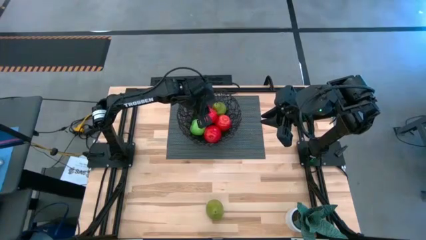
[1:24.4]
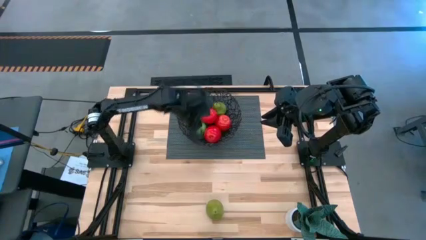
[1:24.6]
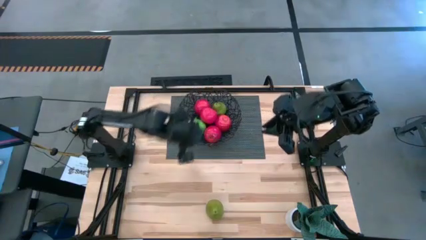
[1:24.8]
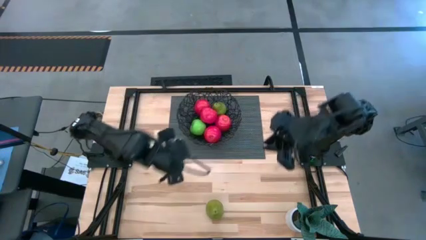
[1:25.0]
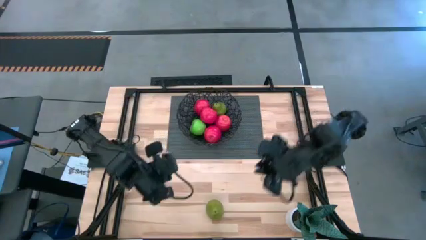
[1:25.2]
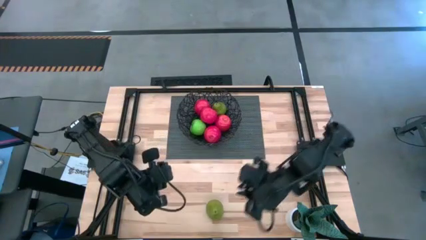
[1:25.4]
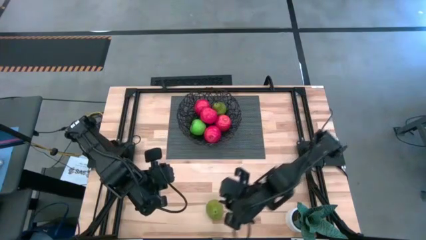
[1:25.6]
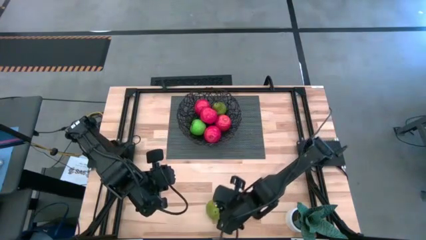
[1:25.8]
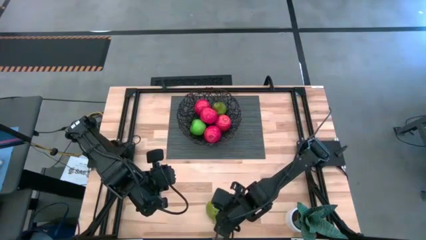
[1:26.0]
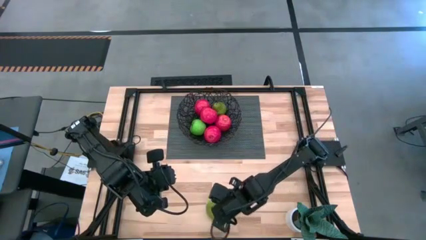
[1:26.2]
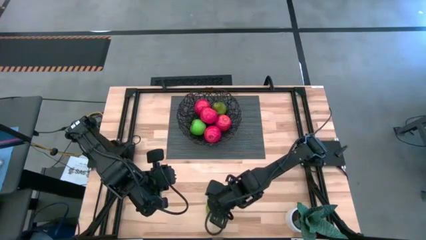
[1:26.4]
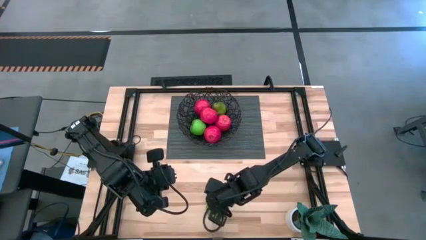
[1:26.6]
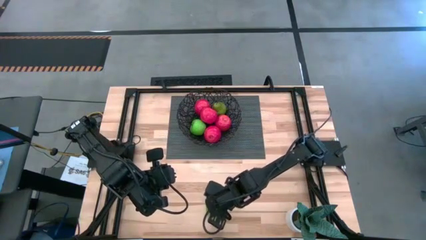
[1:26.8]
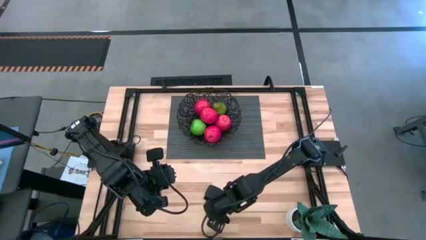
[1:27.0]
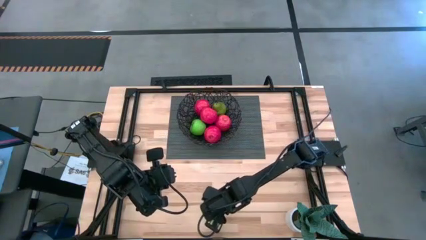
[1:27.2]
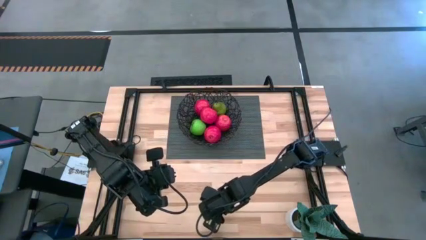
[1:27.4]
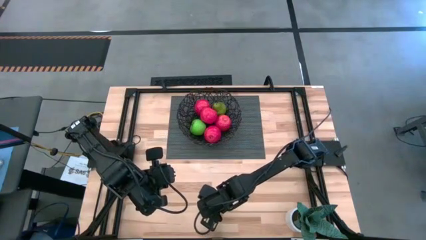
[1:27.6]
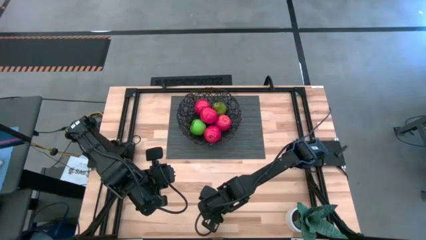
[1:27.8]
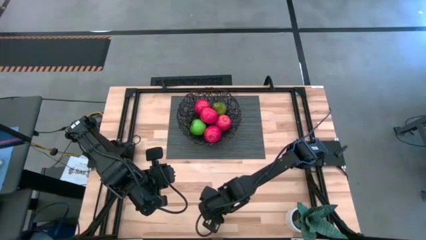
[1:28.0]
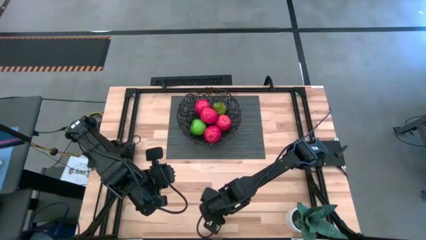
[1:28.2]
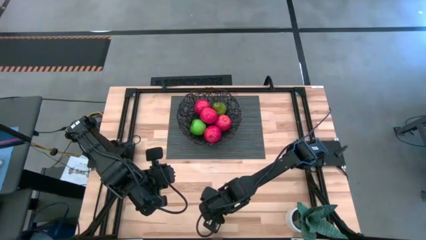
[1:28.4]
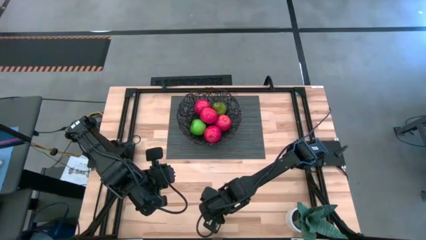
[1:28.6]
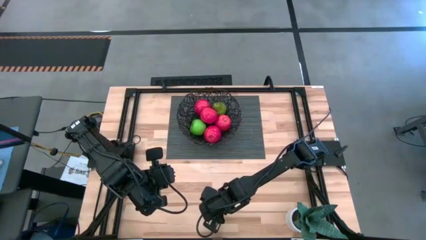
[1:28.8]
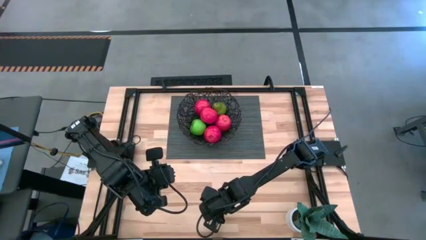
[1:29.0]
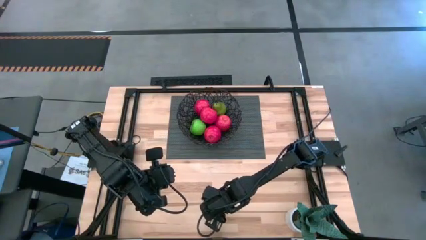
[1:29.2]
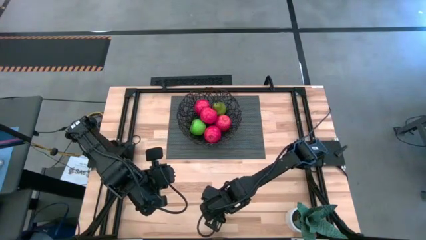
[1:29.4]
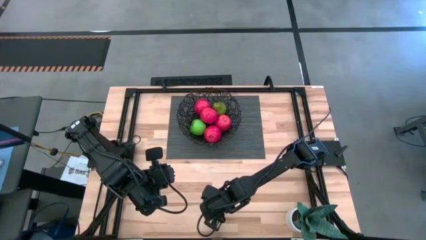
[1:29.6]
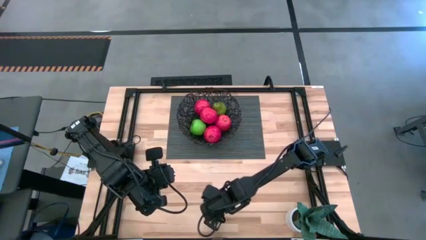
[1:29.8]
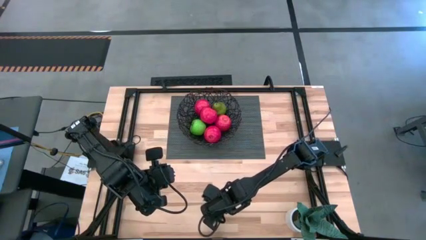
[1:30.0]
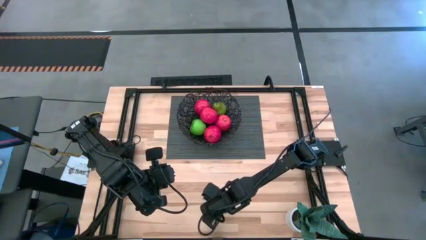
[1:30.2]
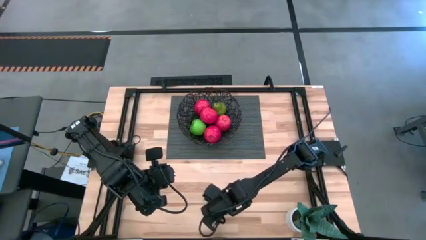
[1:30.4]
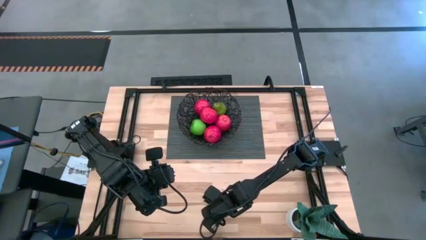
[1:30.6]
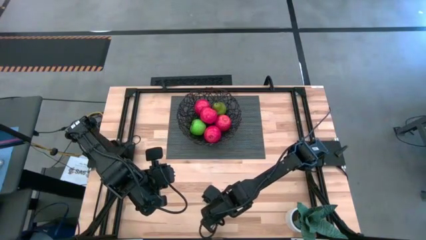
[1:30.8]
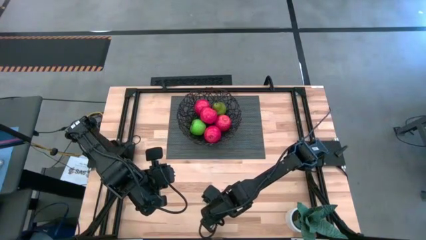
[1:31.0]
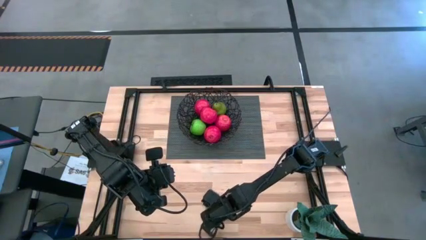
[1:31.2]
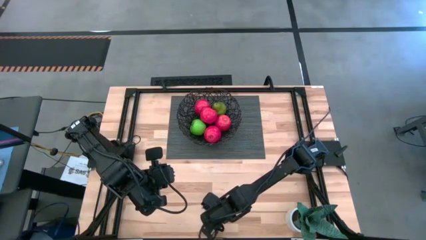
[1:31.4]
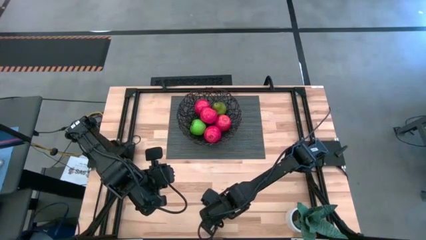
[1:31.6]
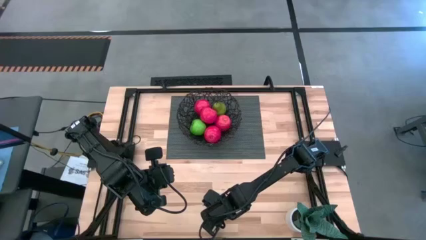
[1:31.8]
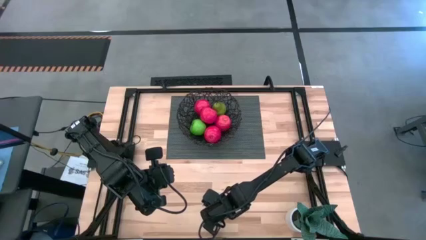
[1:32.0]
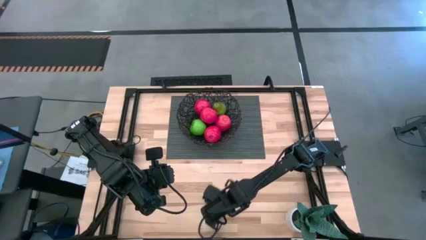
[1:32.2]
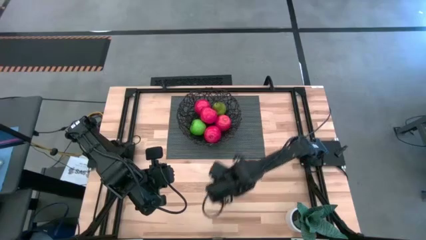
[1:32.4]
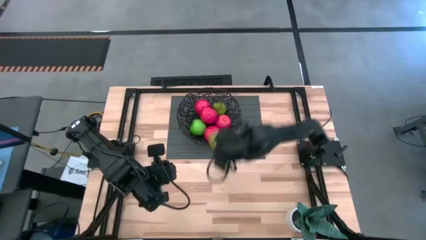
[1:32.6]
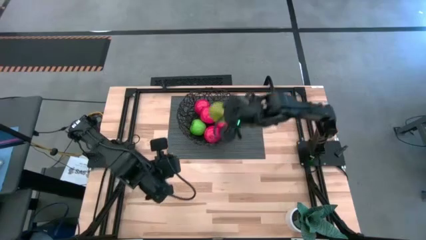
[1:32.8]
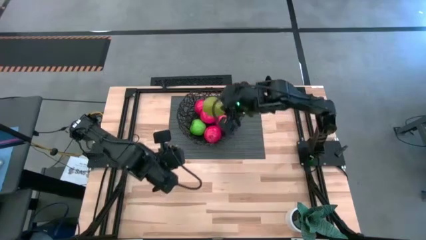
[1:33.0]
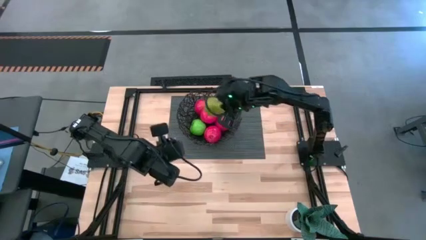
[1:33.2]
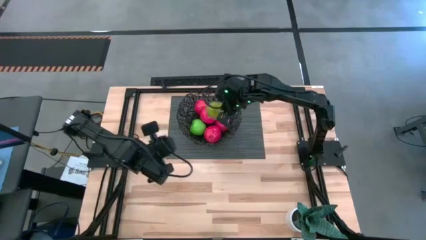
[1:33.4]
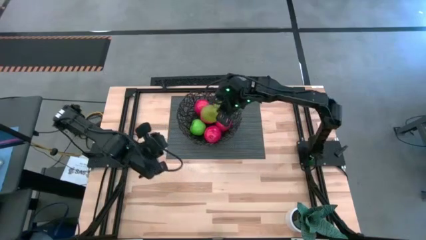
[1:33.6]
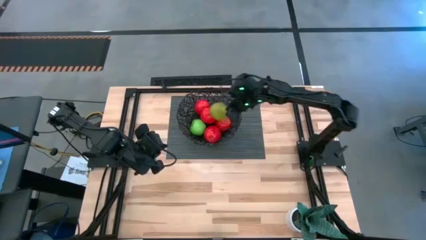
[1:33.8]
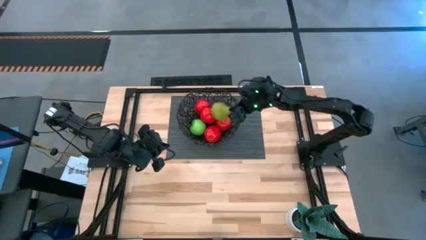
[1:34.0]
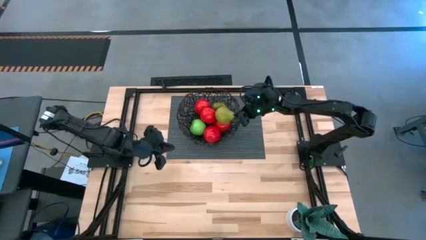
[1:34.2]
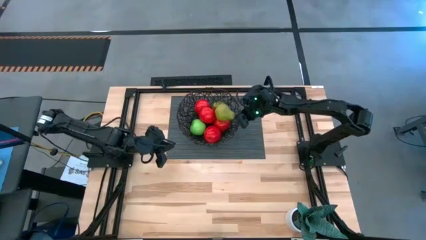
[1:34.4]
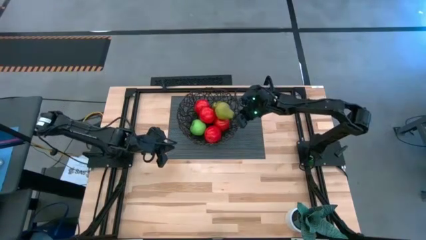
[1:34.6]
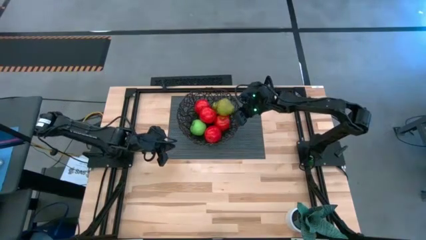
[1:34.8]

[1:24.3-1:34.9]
Task: Build produce basket
Put the green pear into the black basket

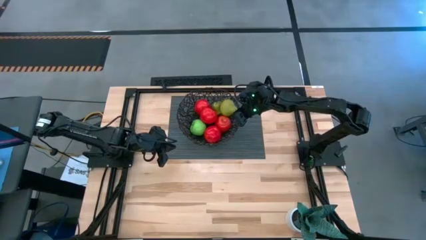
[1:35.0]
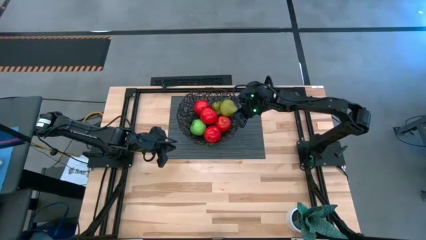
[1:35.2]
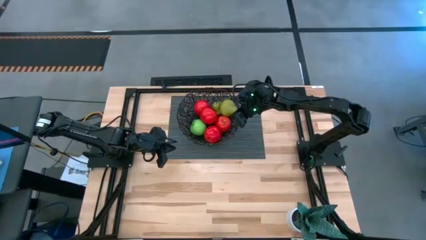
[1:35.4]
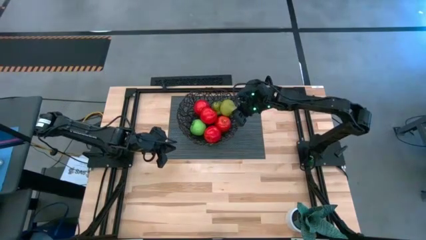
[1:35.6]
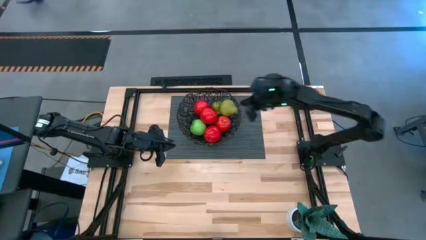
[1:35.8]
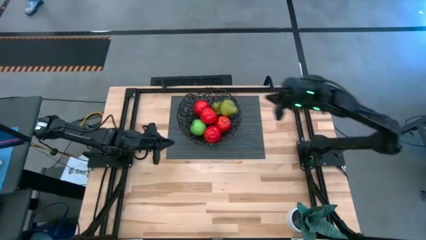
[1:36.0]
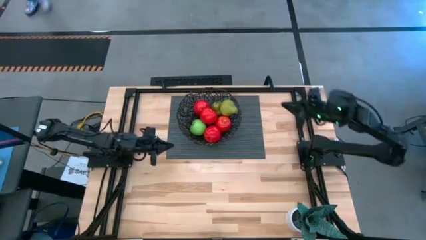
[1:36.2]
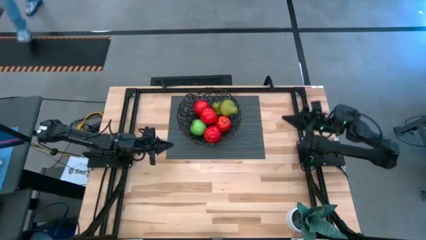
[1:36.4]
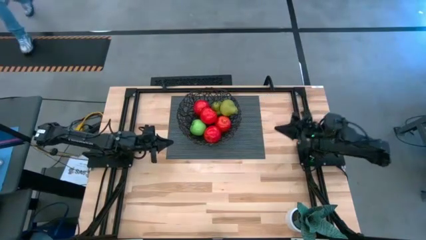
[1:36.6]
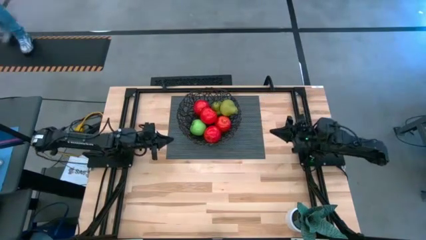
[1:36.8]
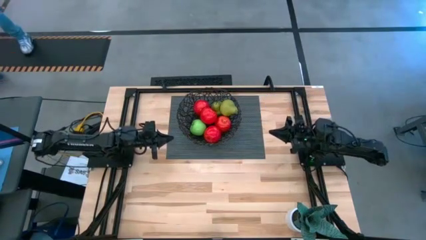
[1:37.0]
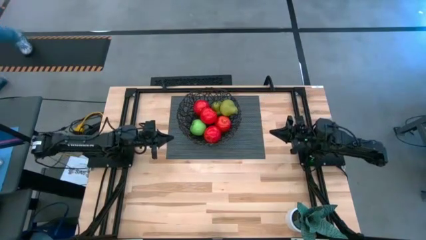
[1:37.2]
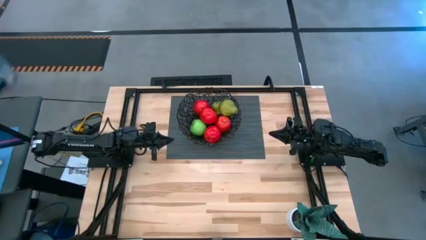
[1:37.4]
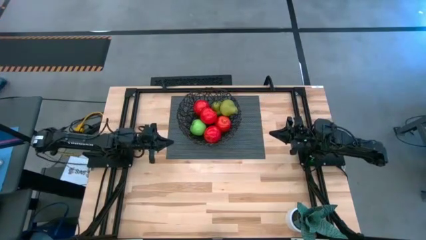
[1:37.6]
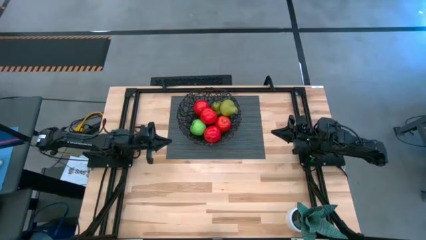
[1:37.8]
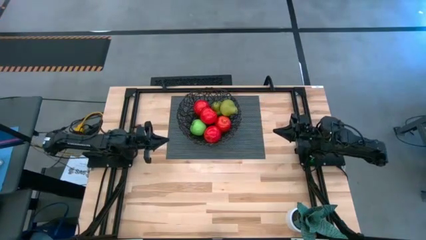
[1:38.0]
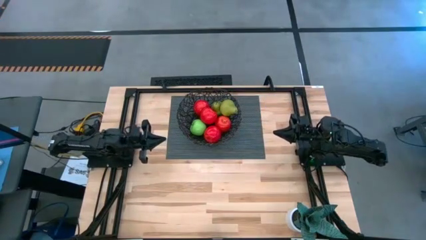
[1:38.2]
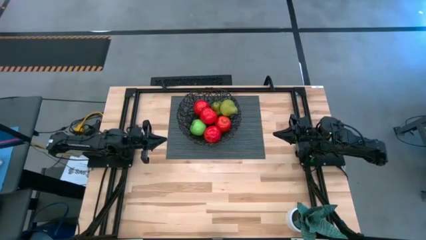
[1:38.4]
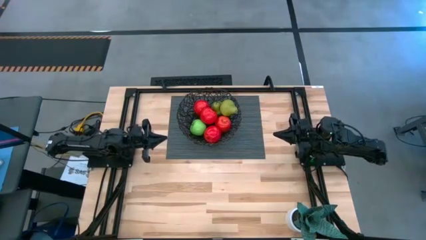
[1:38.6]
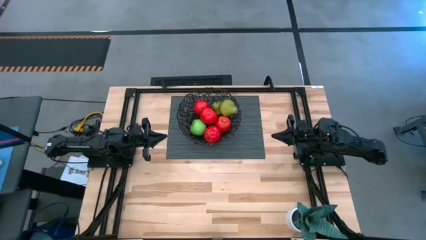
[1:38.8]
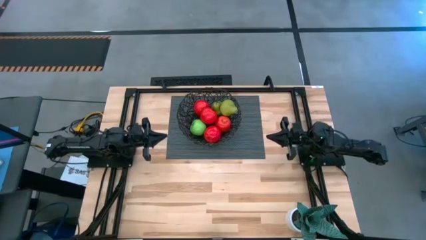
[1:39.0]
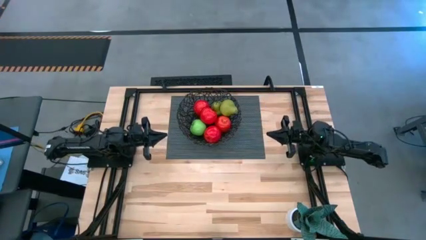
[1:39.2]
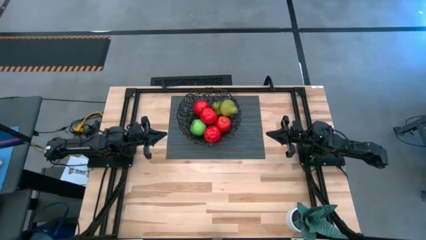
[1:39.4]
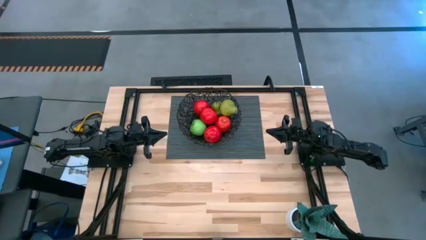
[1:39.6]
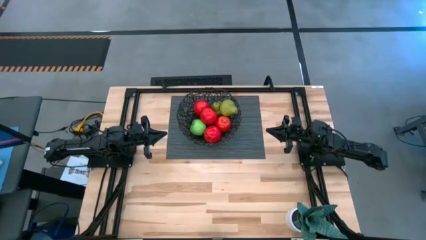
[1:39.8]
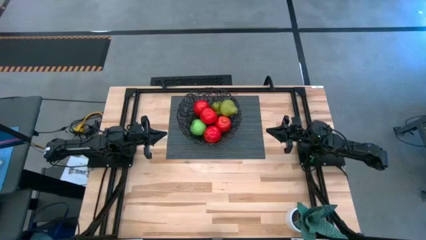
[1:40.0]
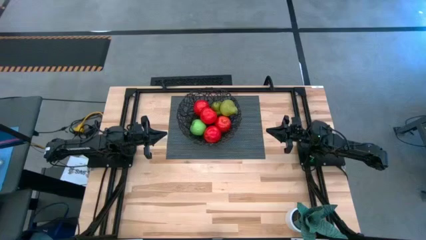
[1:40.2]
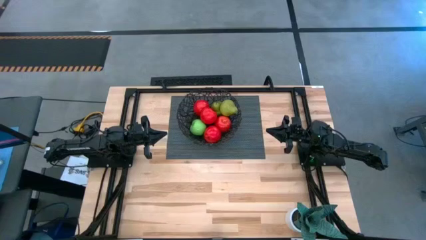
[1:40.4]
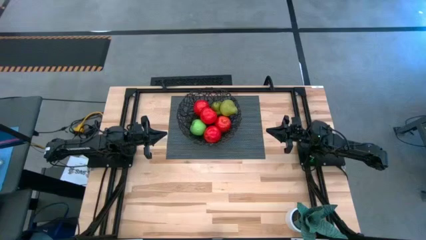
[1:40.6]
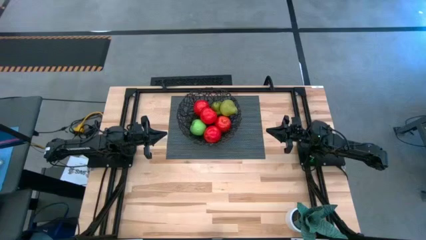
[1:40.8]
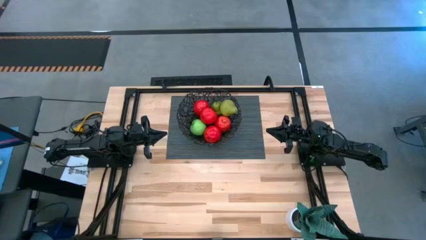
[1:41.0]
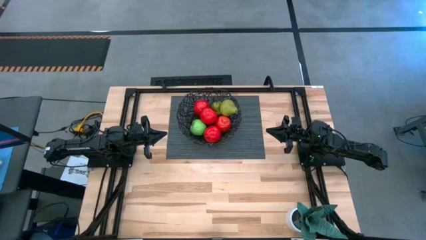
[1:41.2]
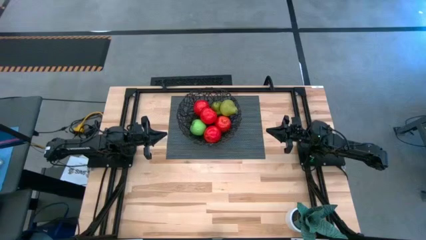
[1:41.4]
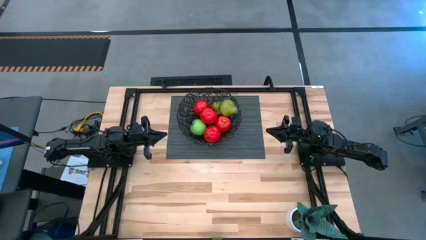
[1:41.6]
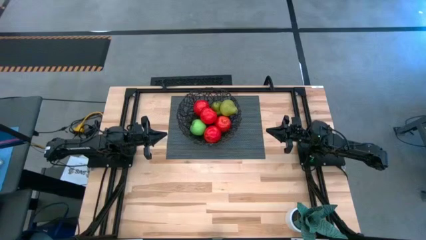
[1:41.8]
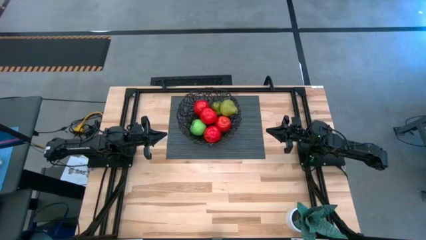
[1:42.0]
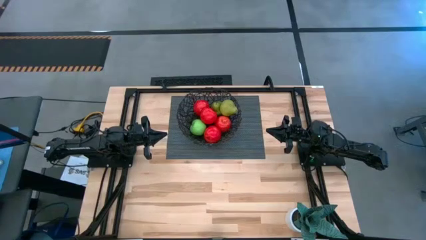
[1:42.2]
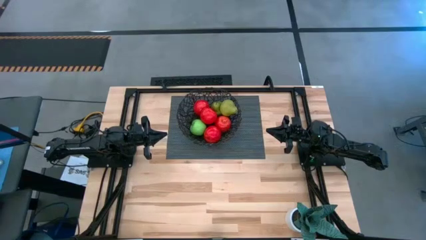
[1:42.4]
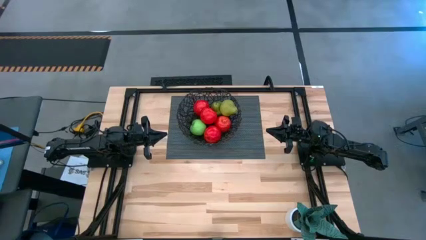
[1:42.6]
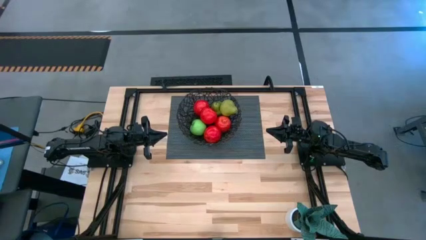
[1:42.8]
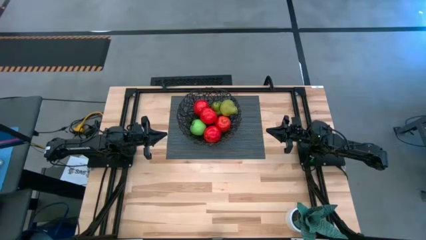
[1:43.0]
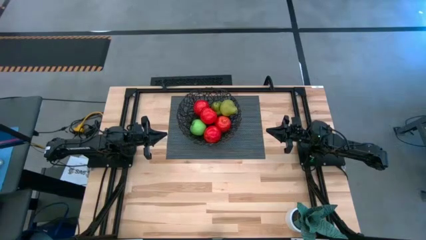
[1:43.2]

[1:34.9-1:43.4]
Return to Home Position
